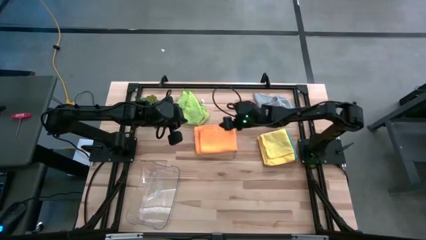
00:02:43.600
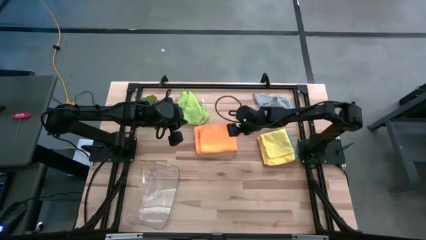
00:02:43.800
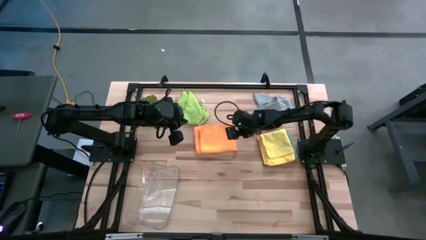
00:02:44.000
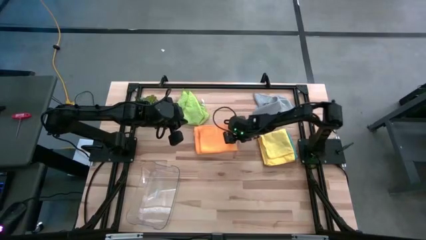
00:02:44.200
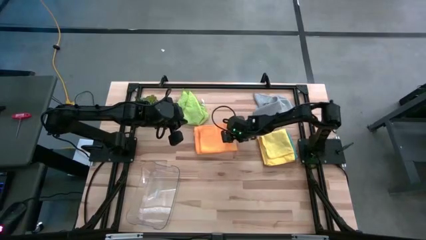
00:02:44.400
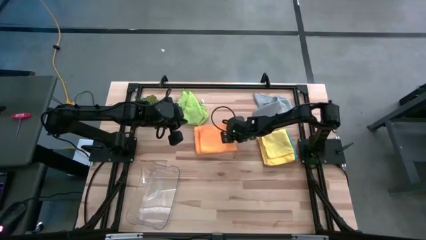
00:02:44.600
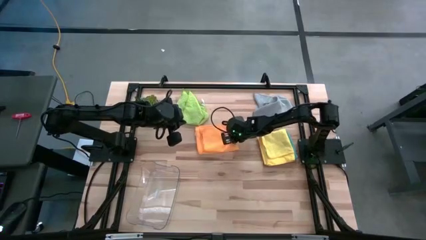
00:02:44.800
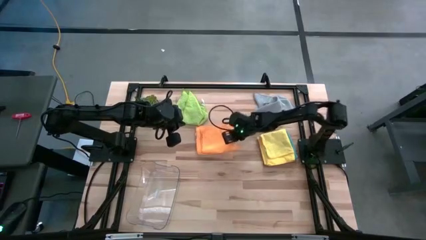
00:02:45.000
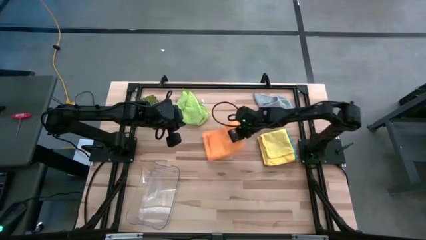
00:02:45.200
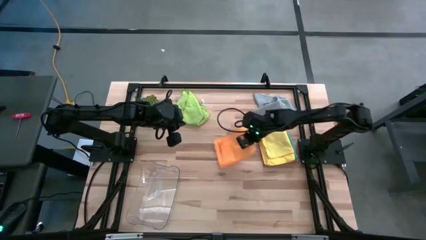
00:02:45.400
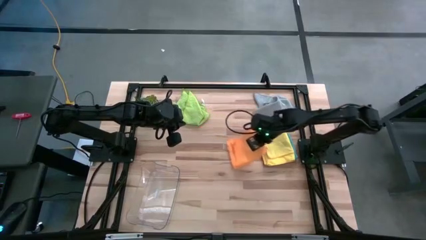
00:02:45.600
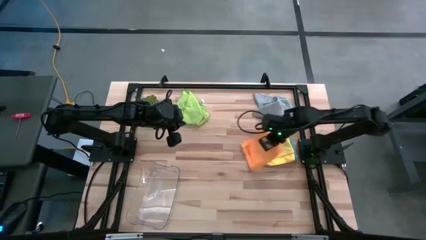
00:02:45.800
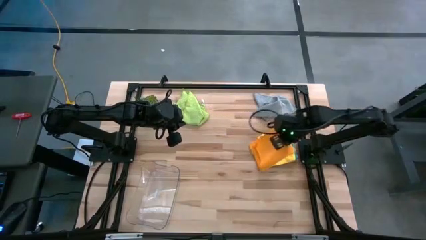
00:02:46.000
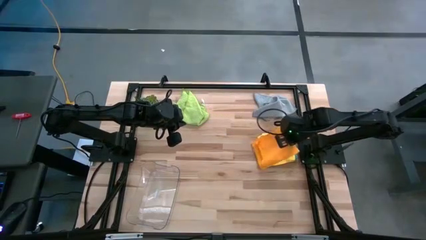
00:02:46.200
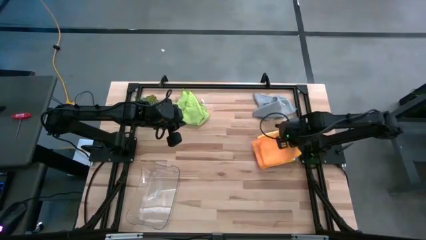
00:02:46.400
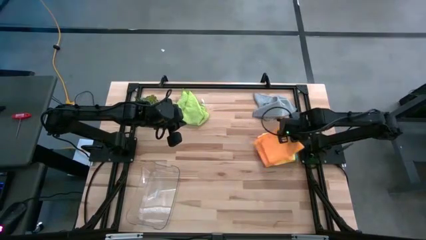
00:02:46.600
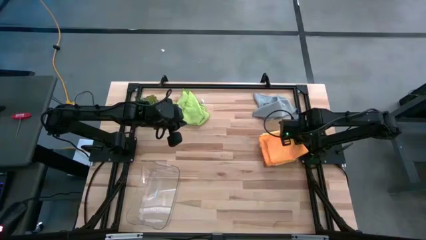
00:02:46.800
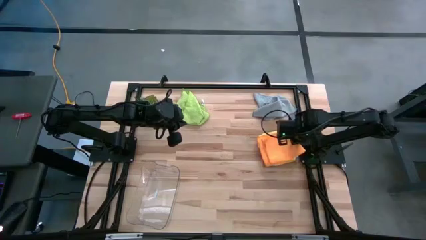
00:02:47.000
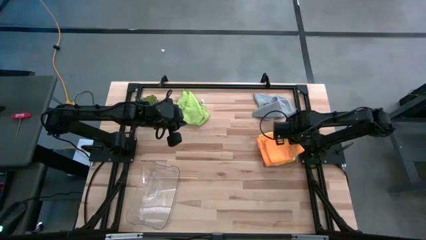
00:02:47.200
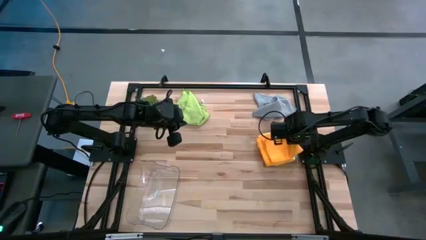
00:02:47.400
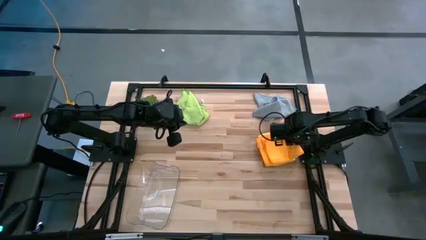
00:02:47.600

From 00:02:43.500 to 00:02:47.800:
Task: Fold microfiber towels
Stack the orange towel on top of the yellow towel

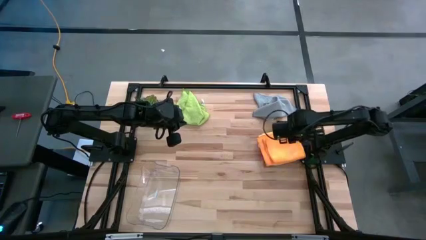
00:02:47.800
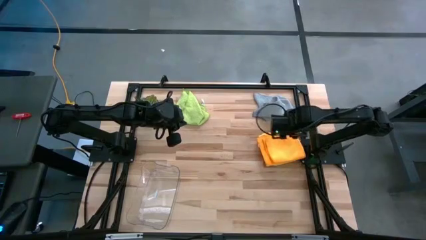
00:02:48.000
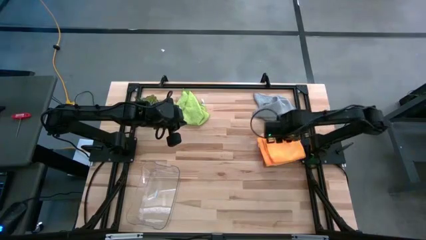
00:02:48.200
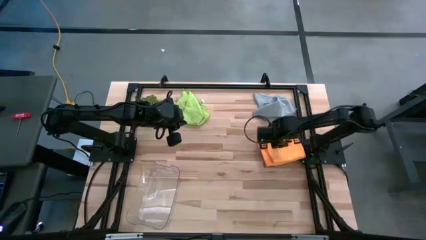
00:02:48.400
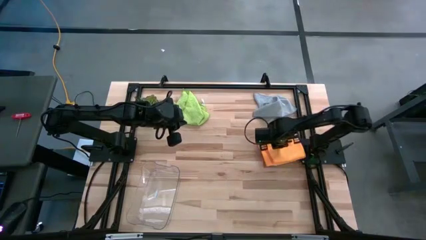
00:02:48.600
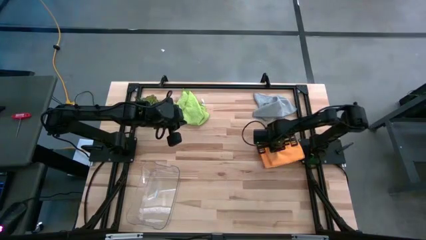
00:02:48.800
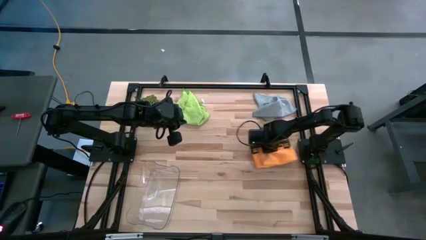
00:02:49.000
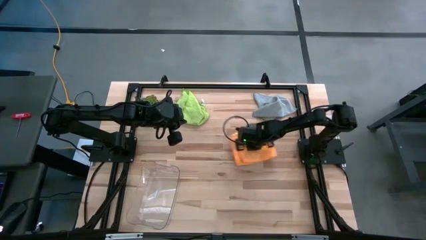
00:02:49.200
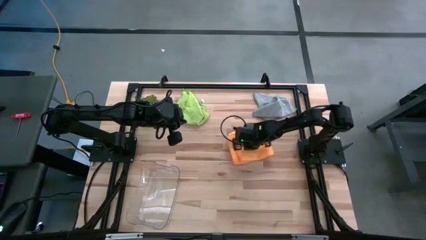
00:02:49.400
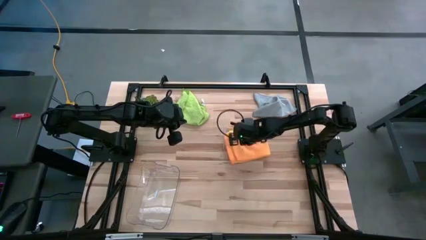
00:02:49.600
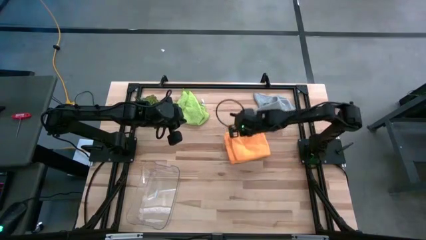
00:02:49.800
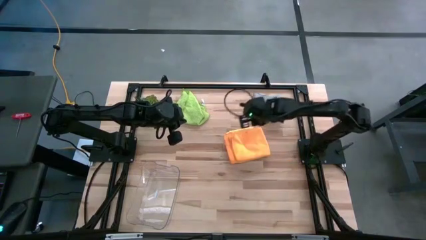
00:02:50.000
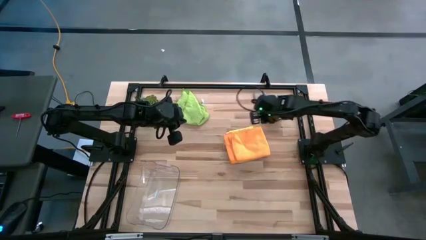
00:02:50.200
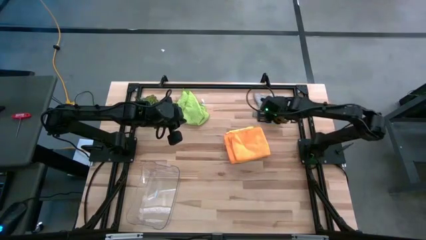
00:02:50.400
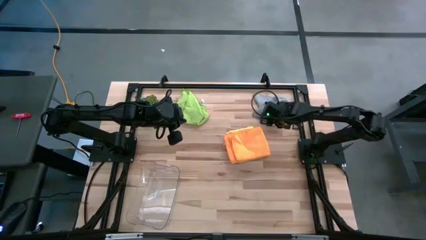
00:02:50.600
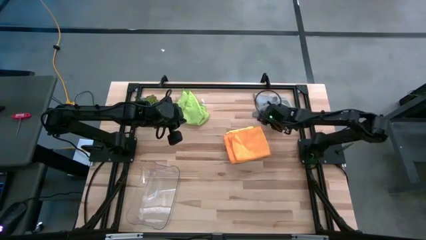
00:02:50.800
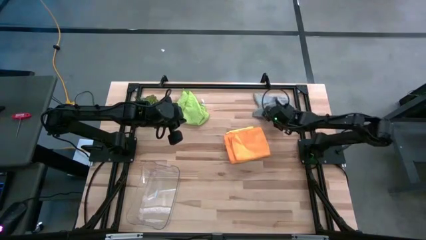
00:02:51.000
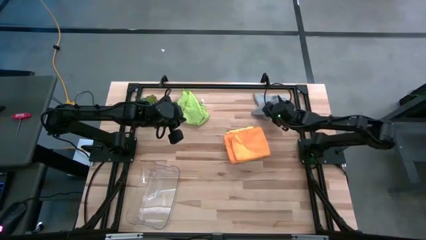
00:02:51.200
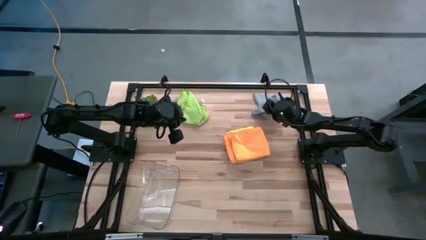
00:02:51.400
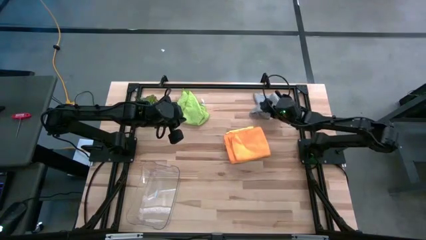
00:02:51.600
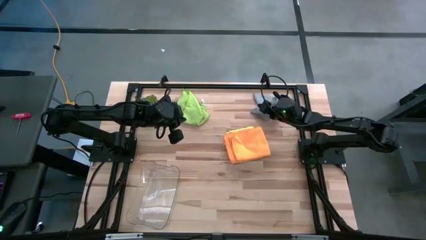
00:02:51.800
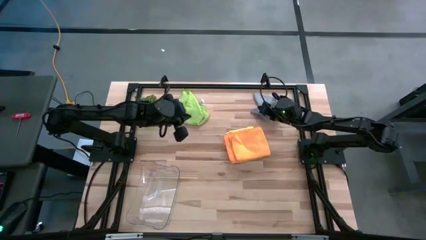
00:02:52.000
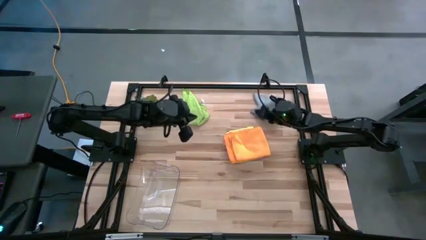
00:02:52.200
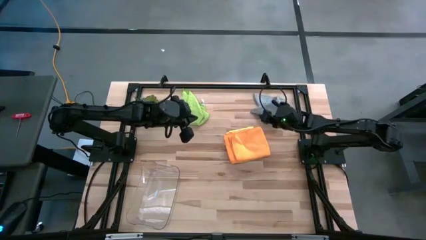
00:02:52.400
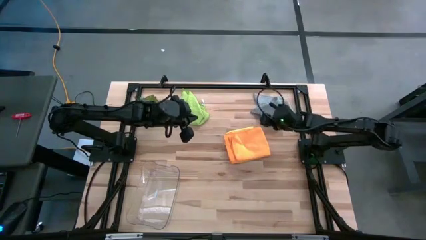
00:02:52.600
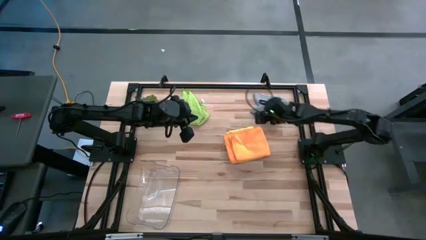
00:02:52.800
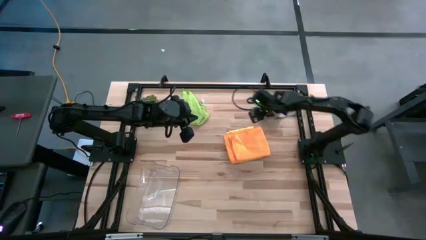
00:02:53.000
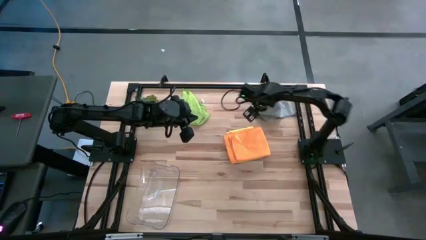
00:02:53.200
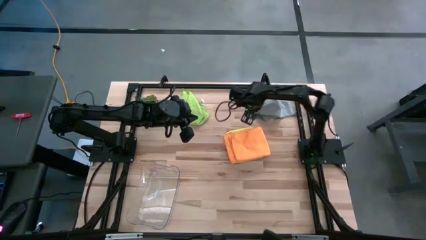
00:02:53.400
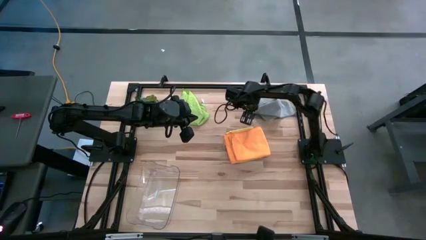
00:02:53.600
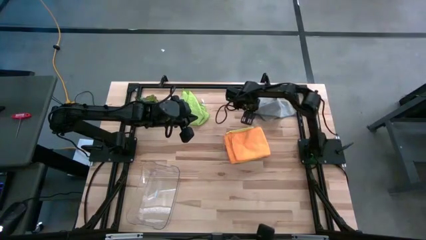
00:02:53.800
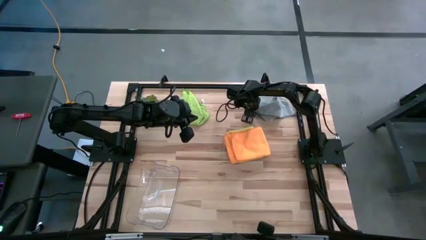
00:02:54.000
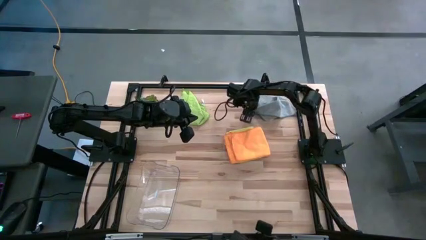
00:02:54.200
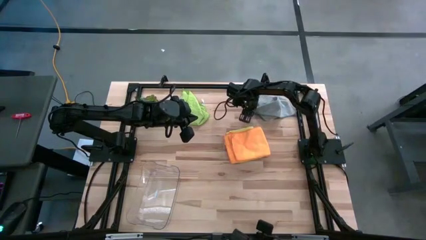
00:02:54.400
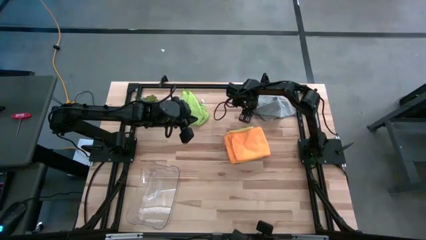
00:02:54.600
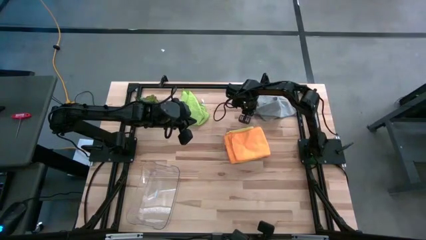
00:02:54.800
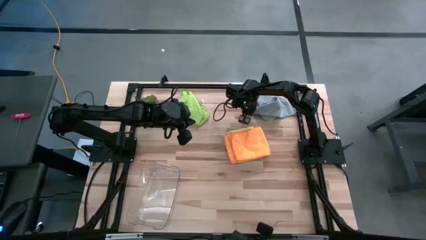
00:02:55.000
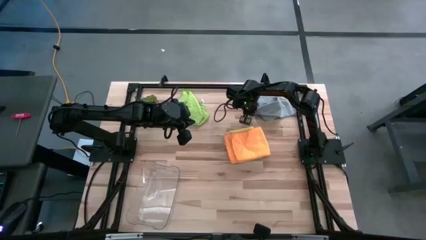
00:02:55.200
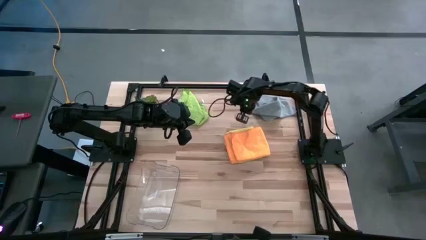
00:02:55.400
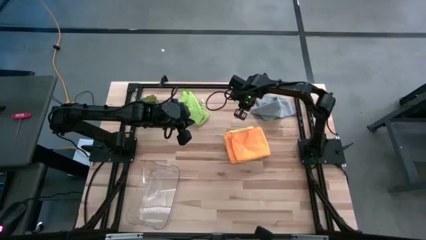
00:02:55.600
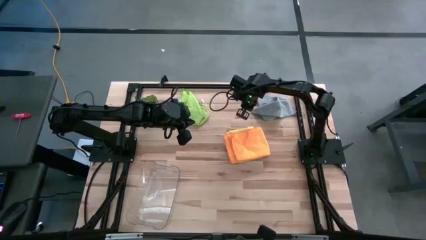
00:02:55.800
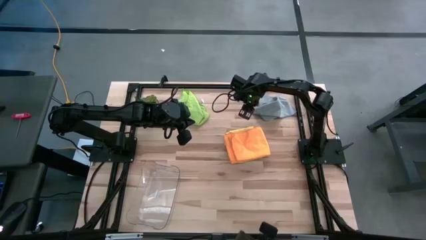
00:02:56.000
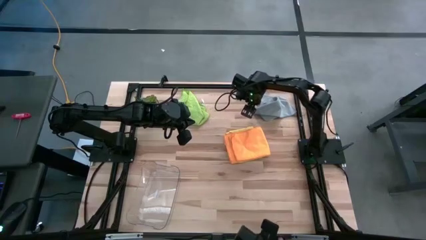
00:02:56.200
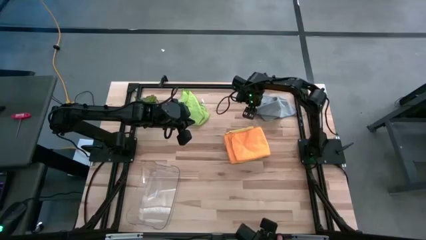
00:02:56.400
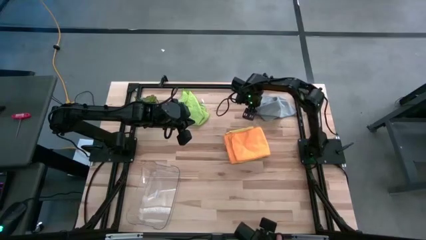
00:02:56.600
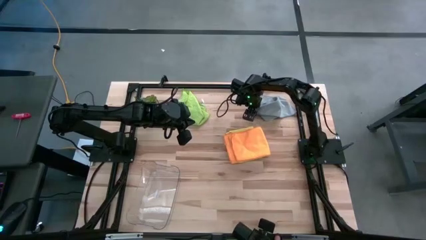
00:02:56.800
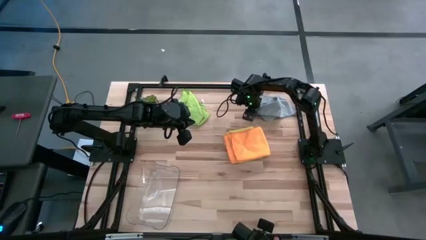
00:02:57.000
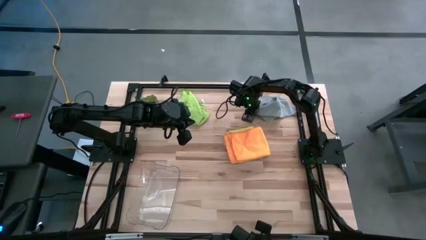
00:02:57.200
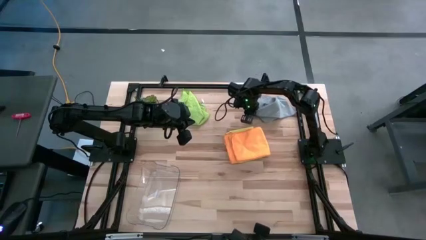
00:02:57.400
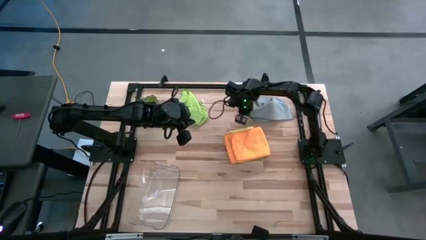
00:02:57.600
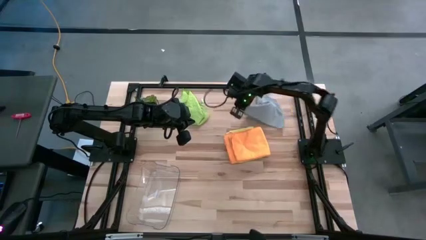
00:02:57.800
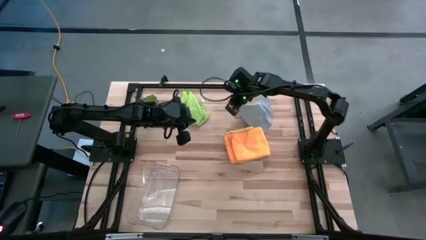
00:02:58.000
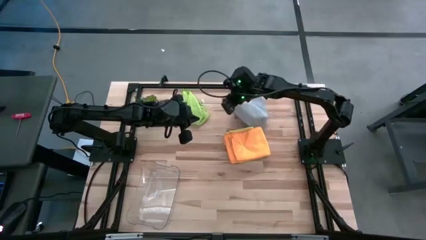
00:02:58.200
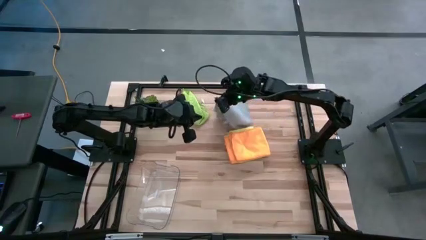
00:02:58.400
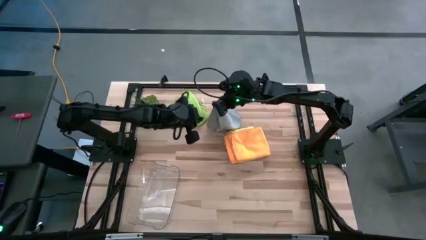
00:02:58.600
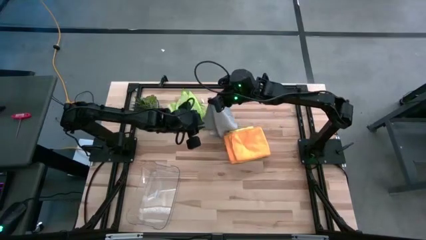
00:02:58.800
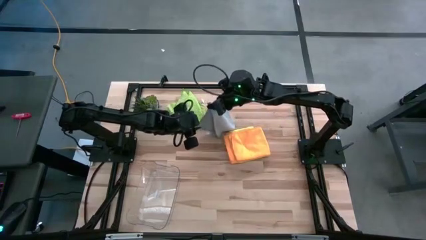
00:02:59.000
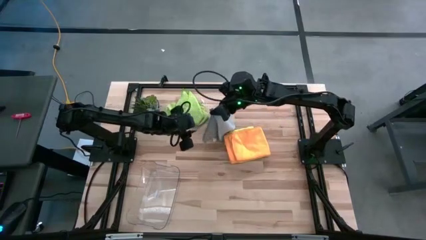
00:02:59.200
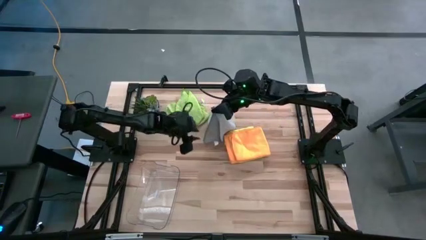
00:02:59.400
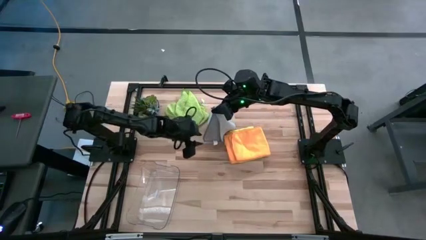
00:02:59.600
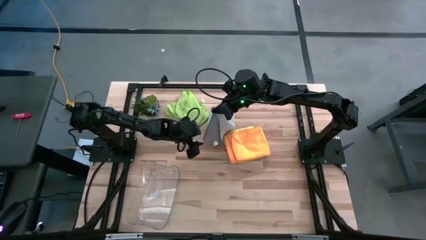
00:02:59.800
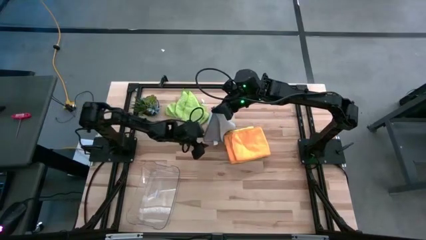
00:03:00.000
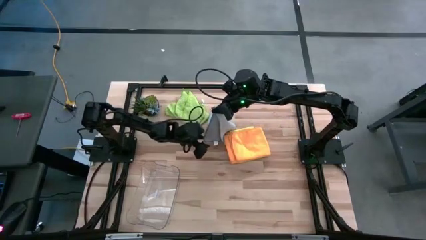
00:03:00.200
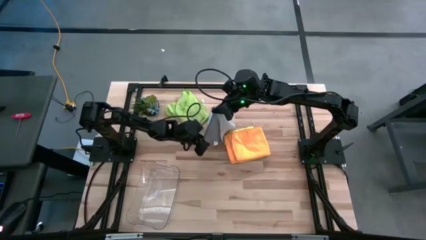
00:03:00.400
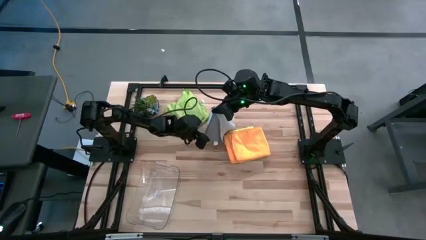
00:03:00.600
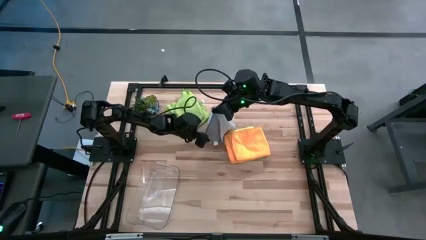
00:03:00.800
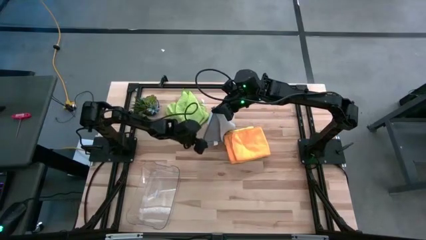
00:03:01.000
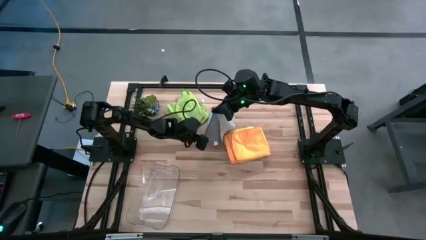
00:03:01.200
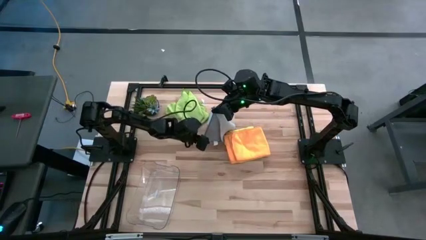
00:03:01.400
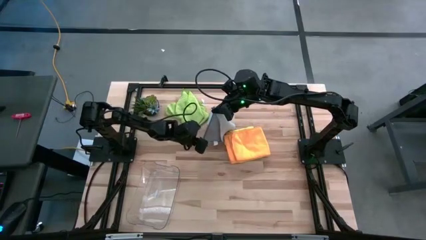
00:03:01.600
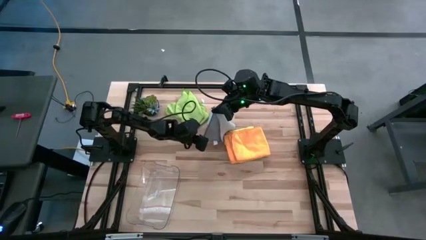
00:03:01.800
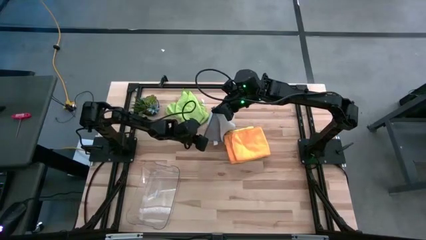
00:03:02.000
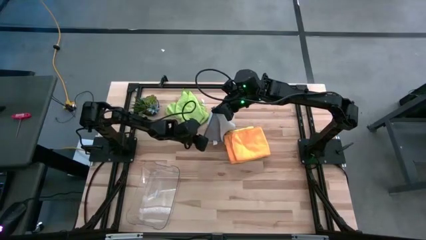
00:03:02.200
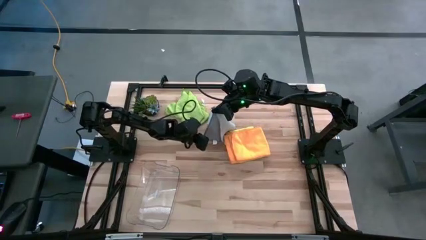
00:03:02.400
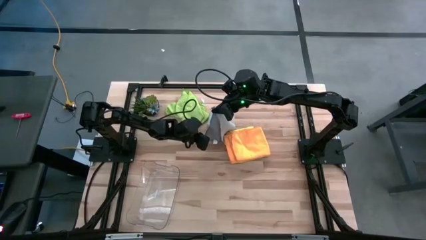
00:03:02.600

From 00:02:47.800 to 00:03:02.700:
Fold the light blue towel
